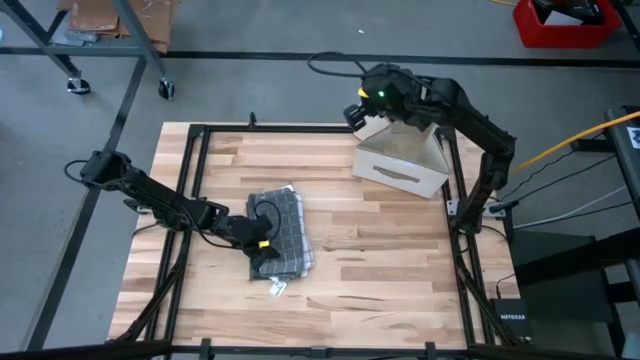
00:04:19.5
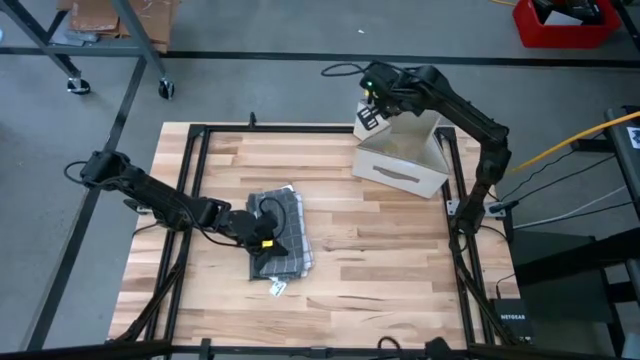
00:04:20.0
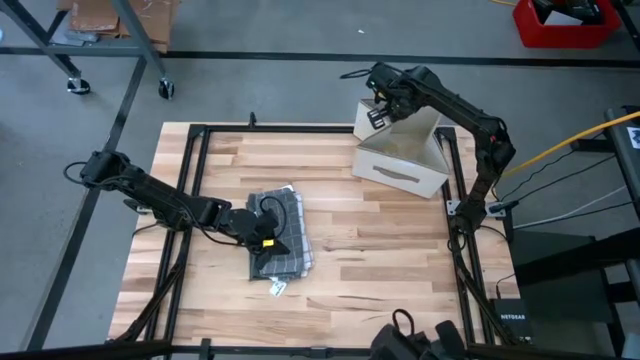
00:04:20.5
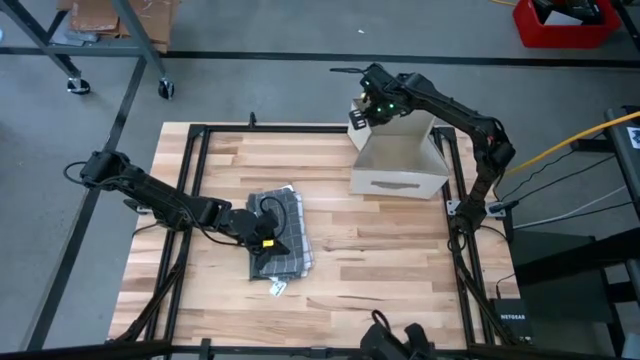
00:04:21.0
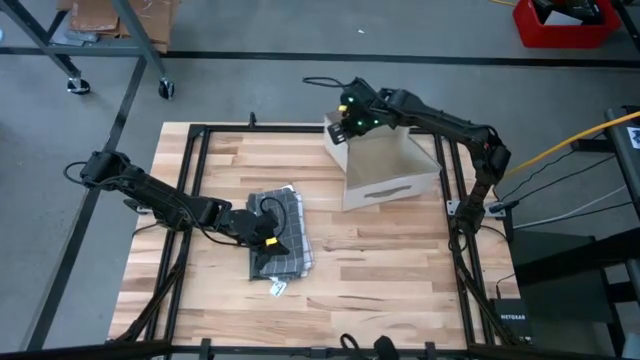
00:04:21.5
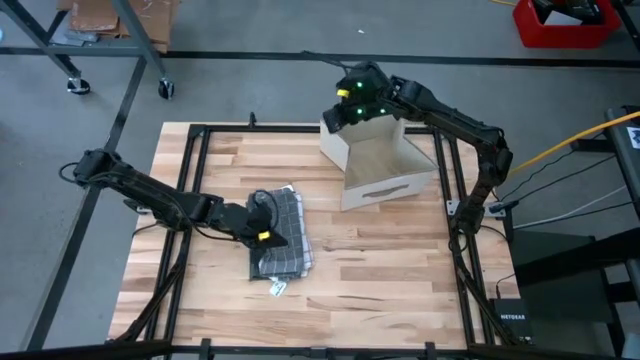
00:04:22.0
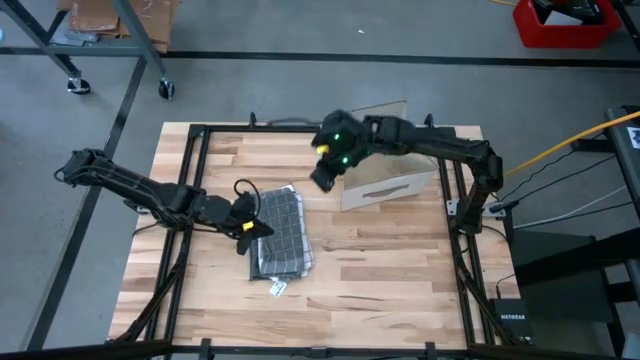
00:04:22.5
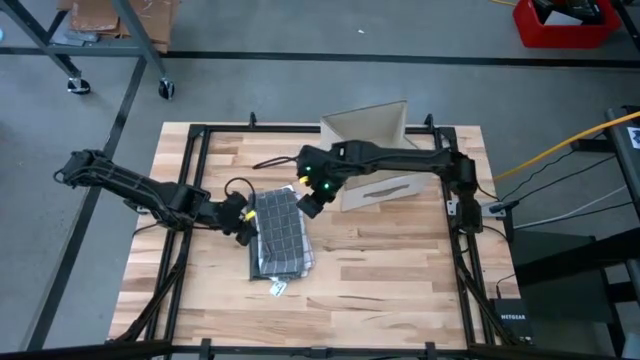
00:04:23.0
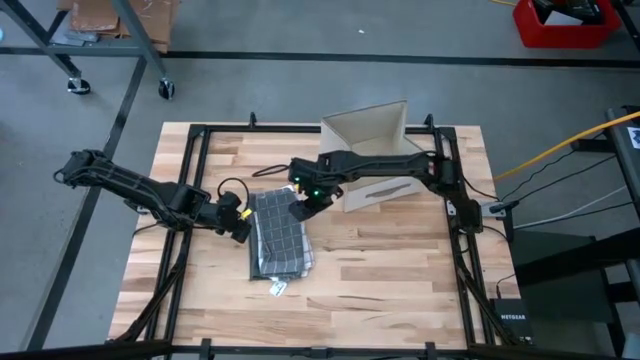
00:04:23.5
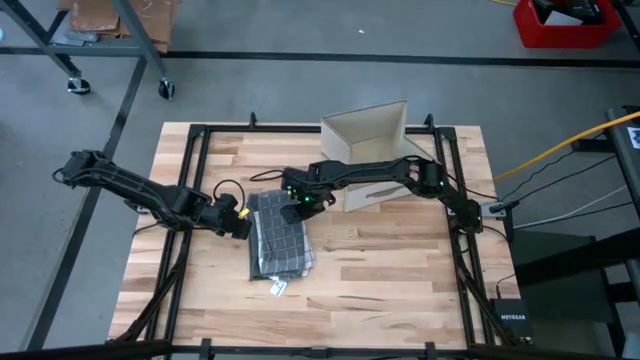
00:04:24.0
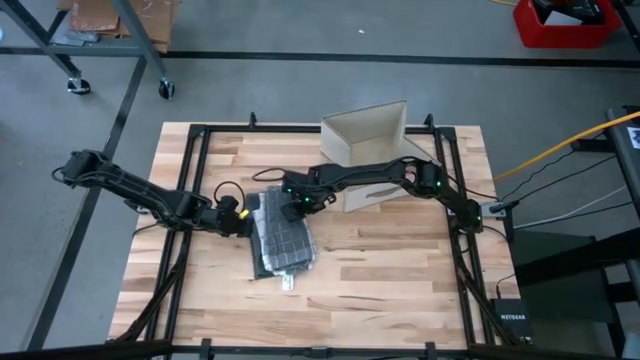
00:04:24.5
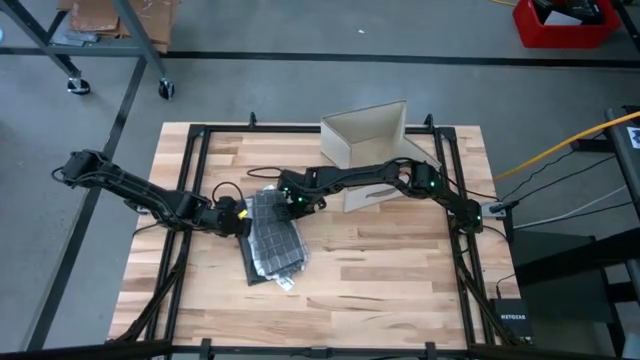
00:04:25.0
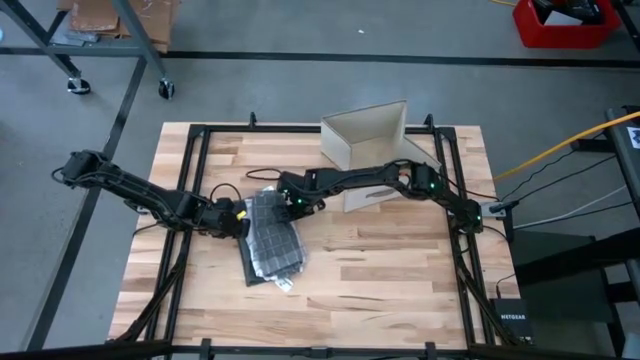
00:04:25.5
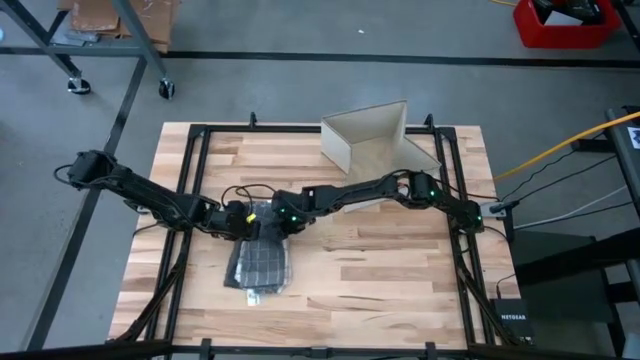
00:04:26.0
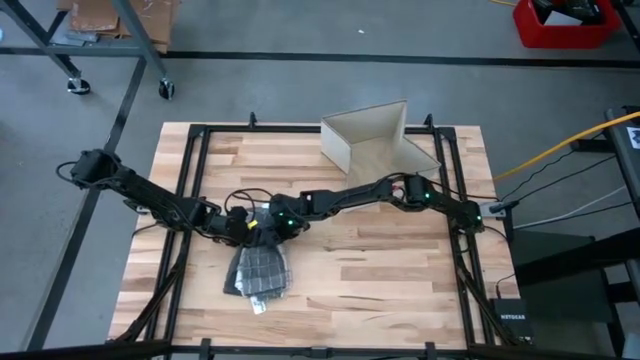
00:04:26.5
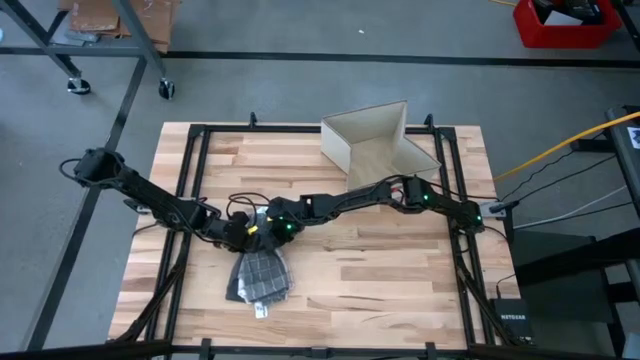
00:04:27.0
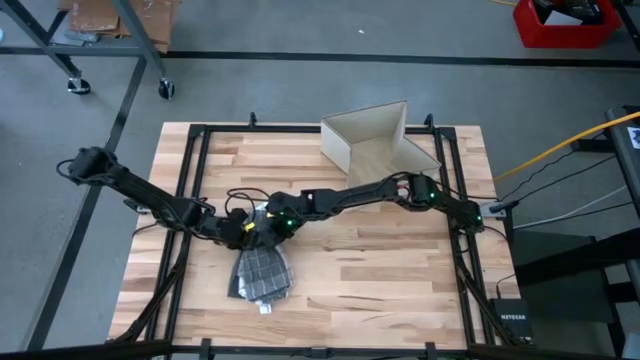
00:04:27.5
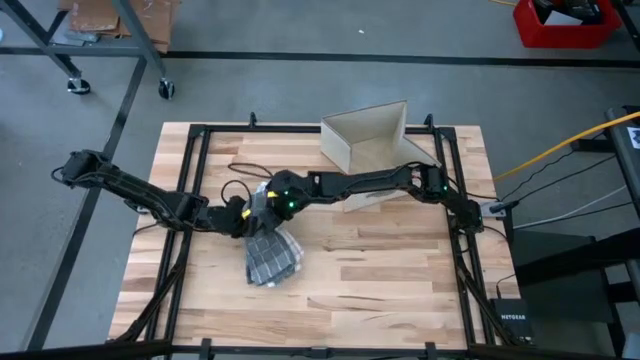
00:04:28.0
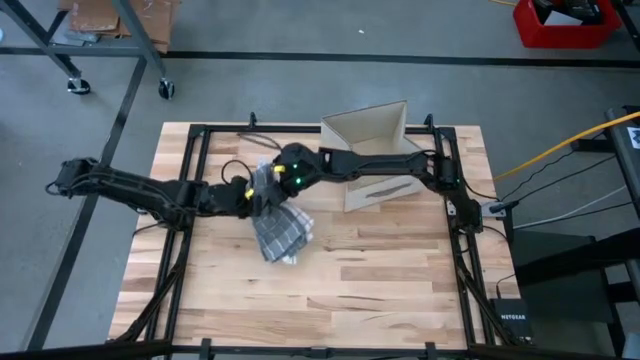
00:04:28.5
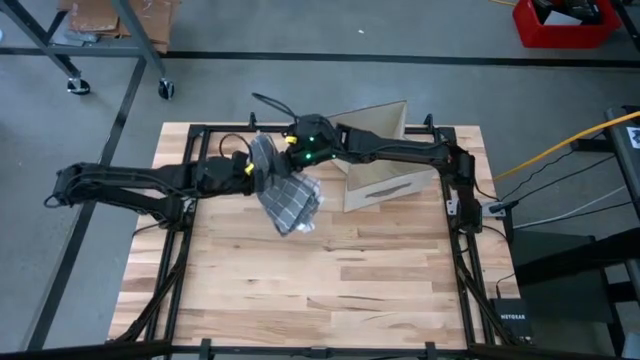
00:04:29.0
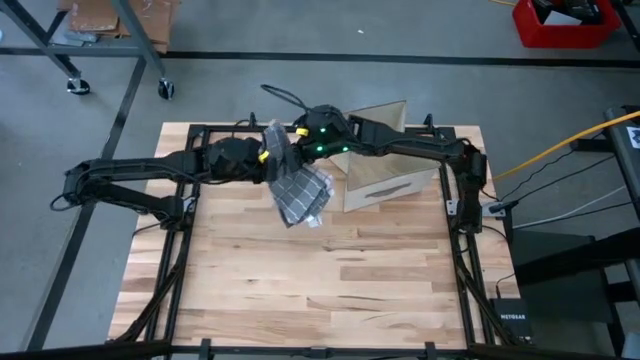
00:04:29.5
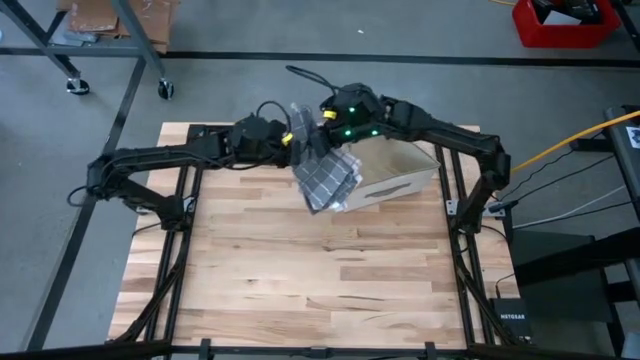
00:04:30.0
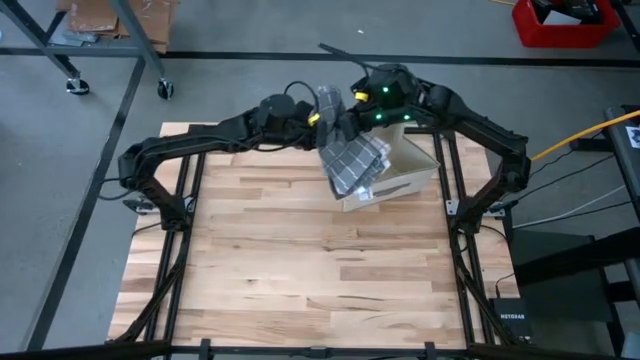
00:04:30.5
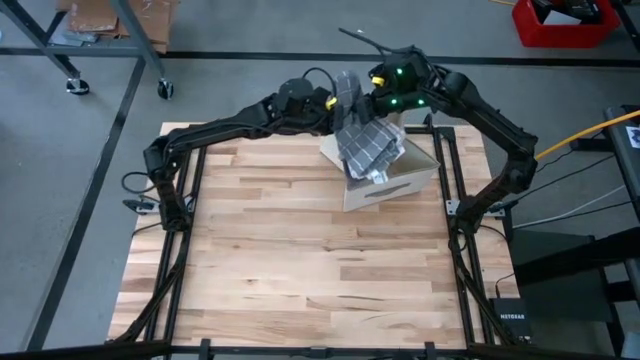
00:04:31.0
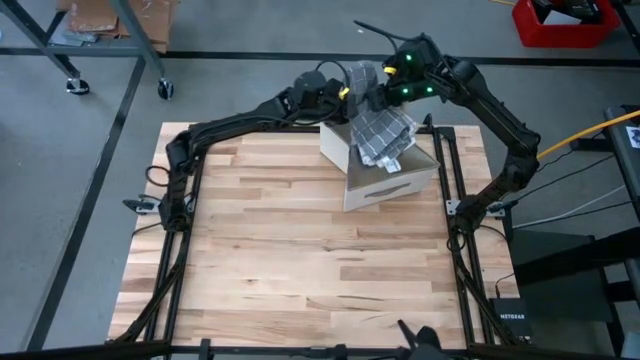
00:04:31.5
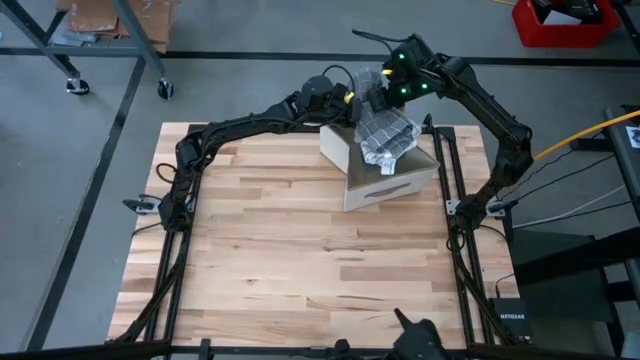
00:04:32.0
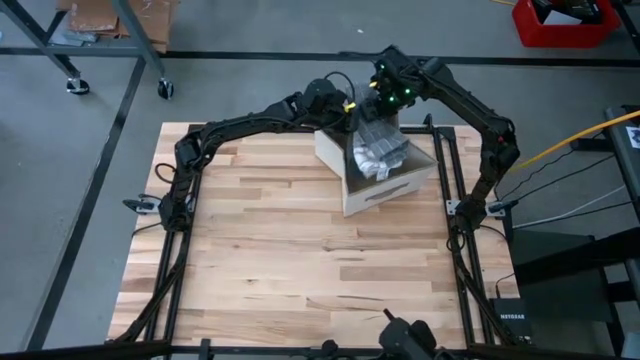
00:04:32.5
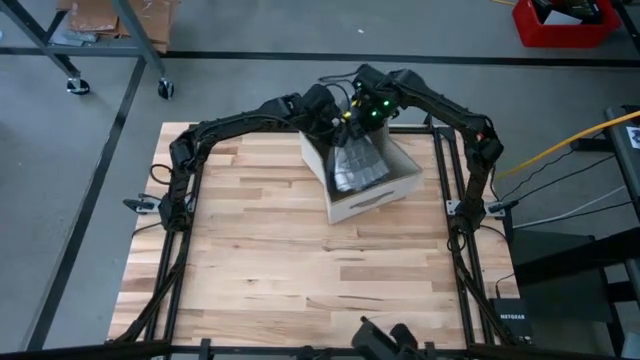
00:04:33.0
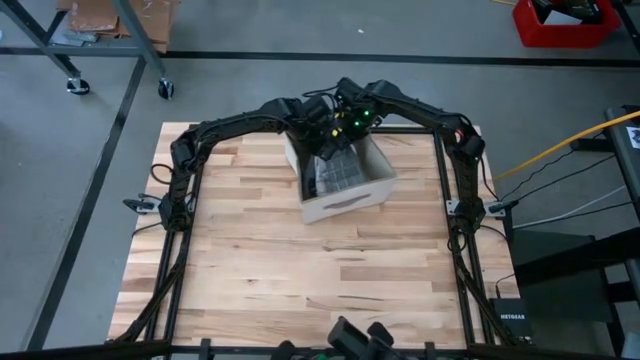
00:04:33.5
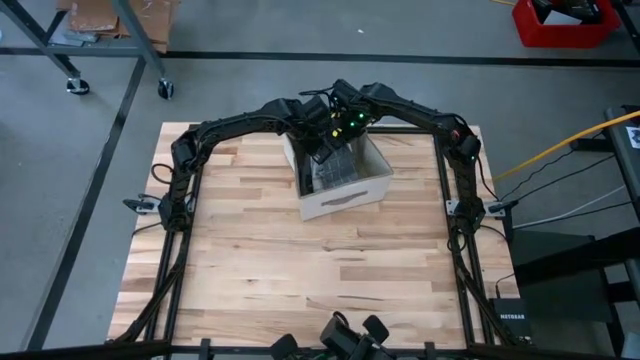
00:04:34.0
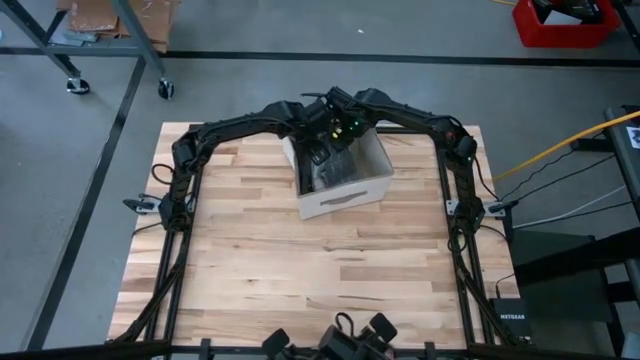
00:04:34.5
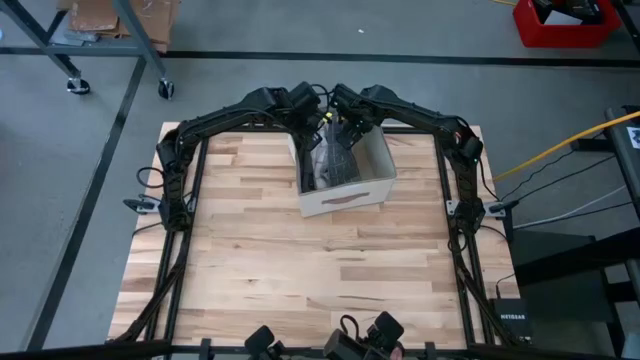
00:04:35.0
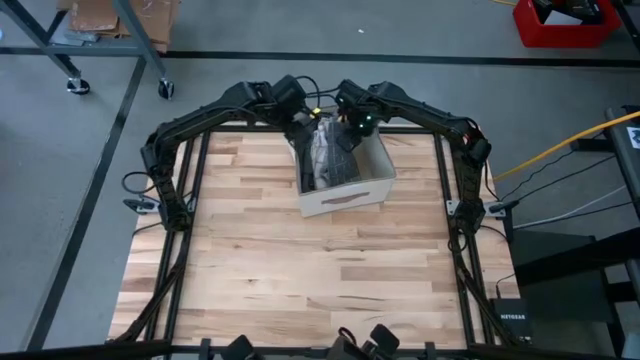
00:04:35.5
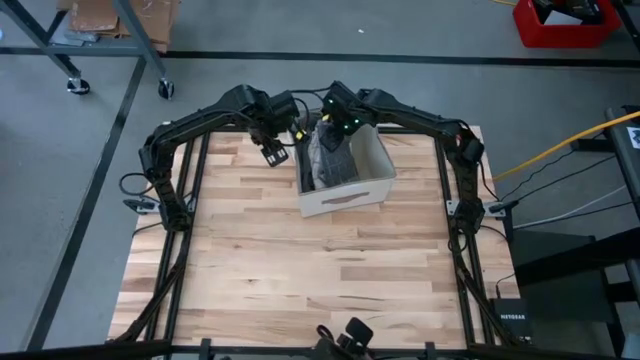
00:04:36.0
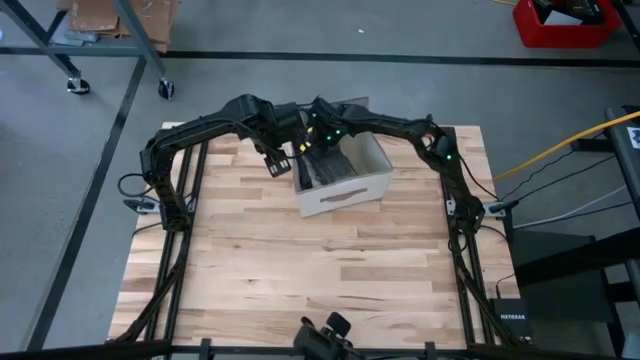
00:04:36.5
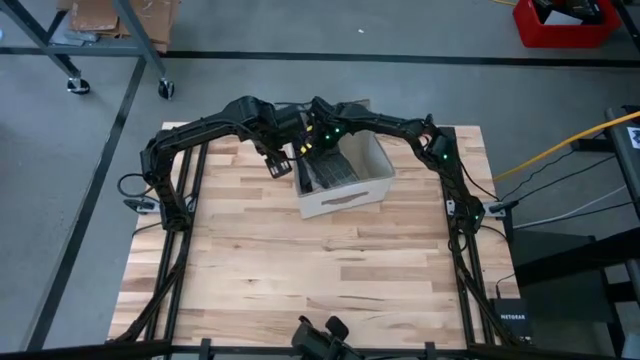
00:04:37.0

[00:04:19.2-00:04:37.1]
Task: Fold towel
Put the stacked kitchen towels into the organizer

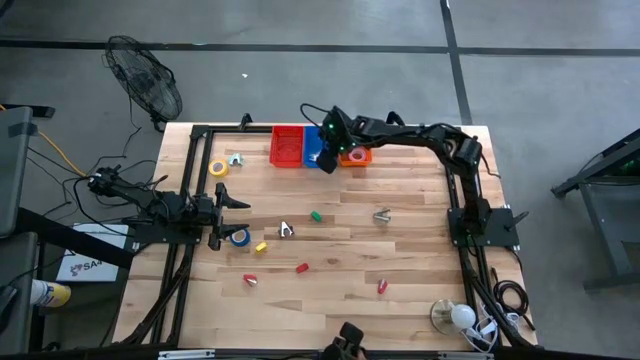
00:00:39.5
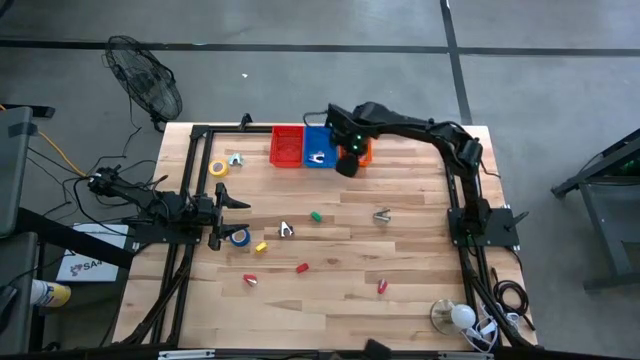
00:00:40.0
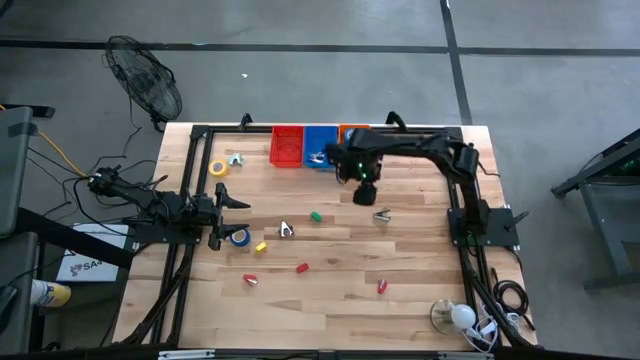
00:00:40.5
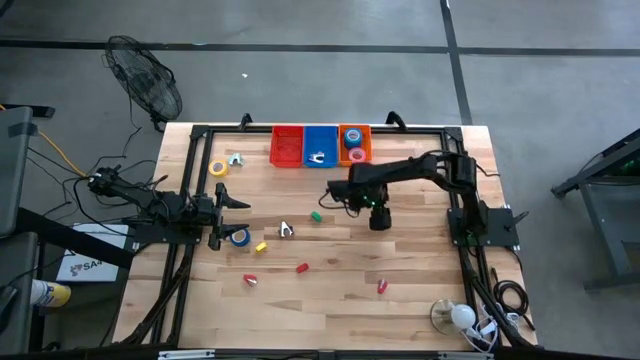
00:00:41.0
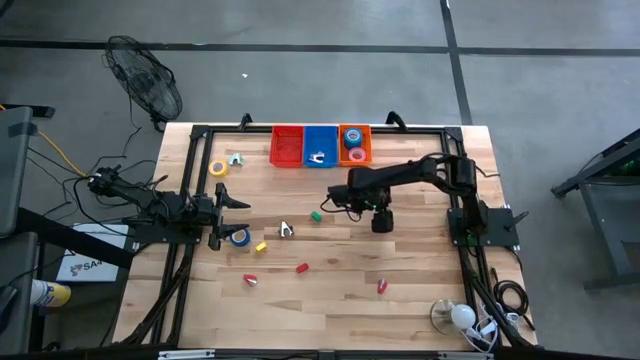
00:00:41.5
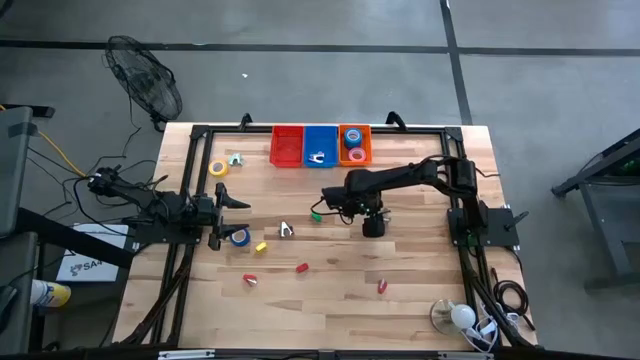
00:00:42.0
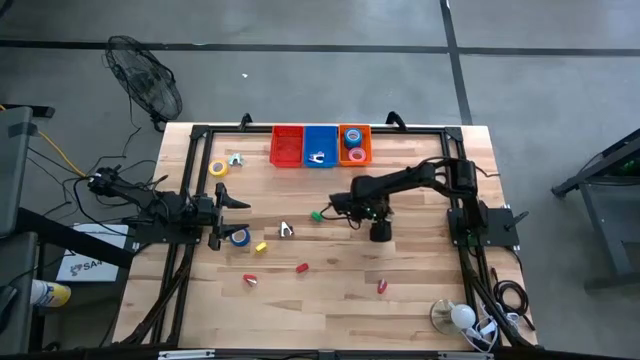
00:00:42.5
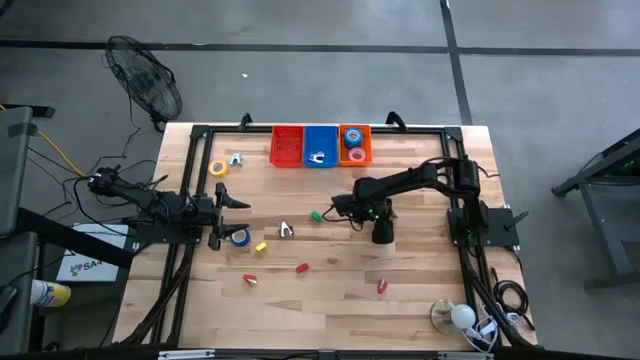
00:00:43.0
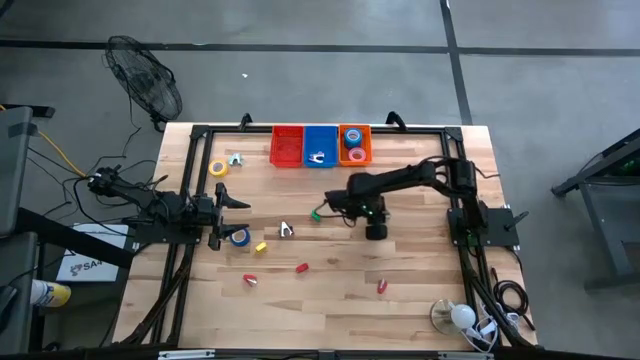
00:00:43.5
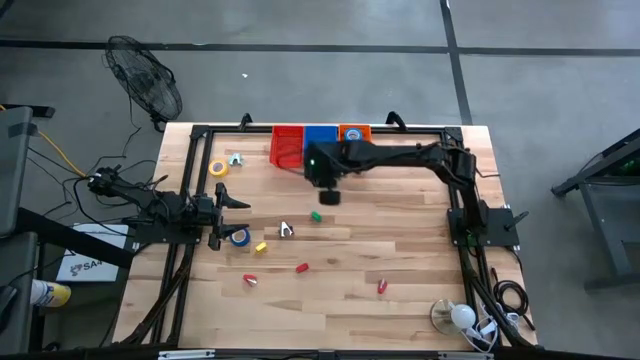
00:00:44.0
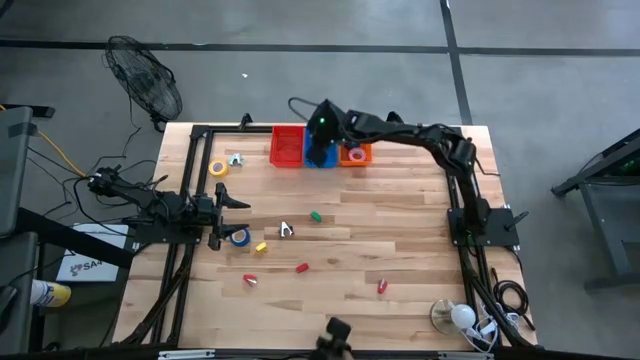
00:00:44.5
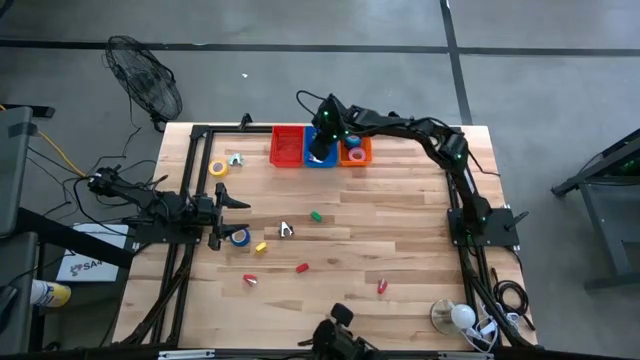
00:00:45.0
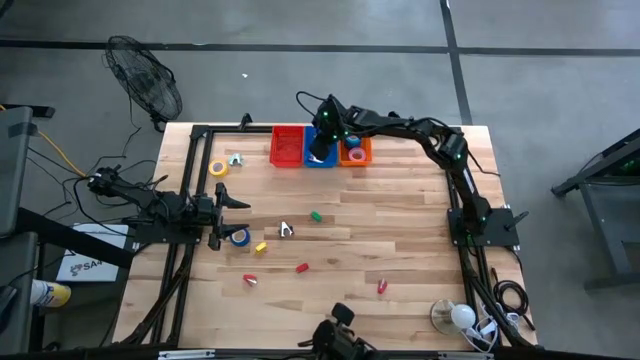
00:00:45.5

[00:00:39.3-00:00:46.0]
Task: Pick and place Stapler, Stapler remover, tape
Put the gray staple remover into the blue bin
